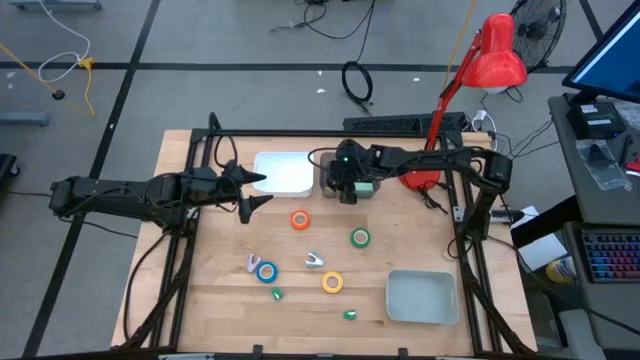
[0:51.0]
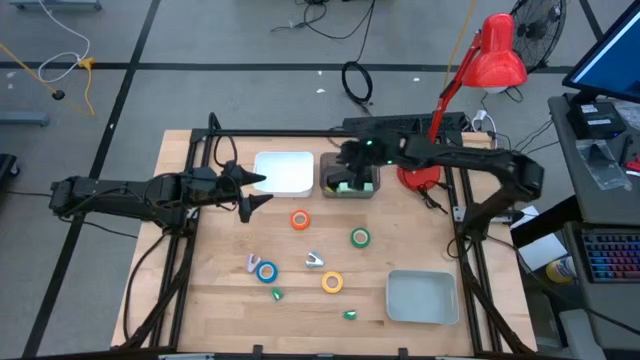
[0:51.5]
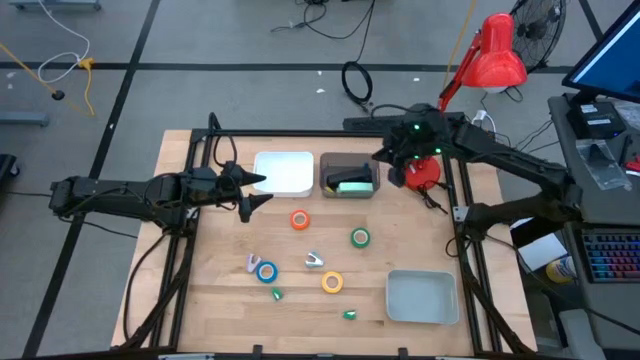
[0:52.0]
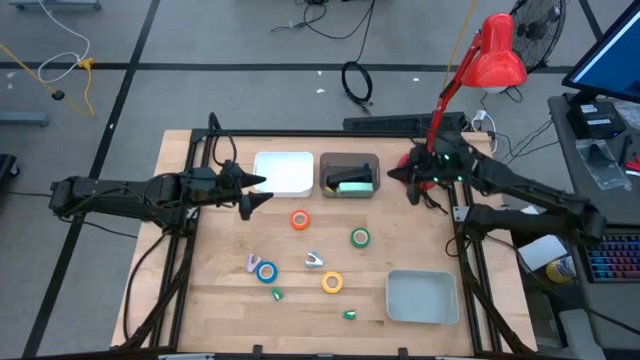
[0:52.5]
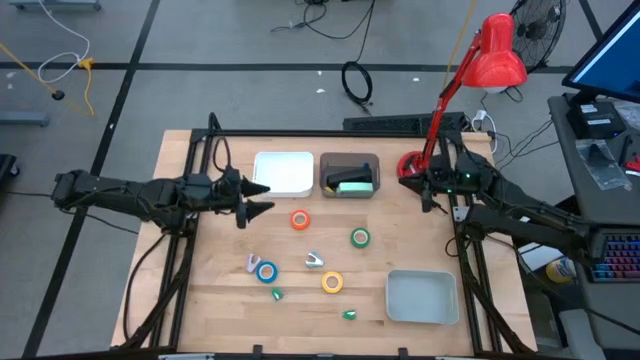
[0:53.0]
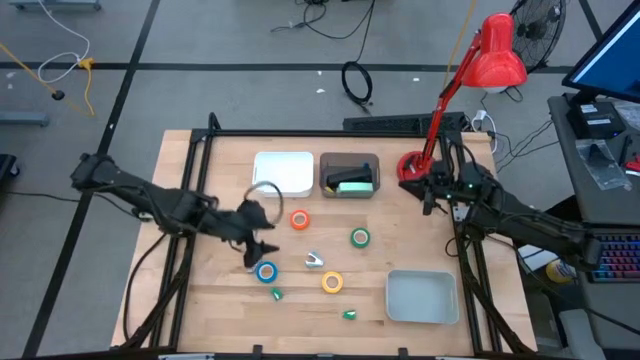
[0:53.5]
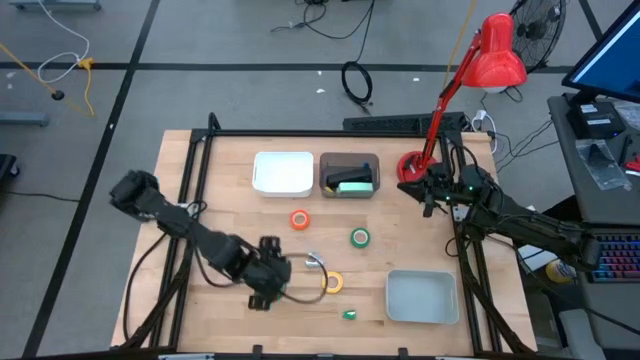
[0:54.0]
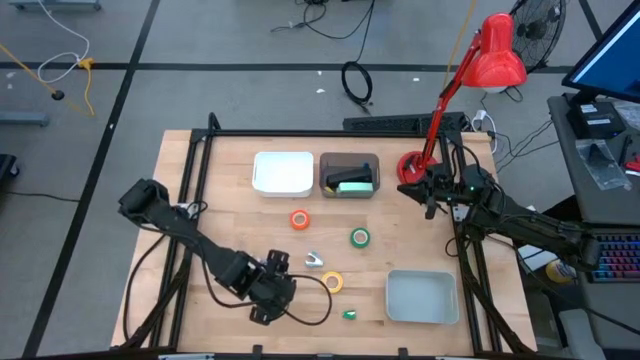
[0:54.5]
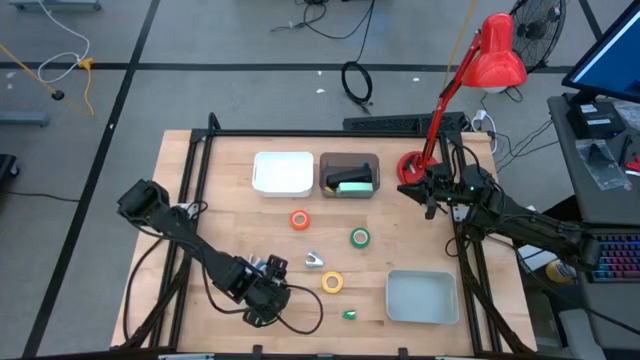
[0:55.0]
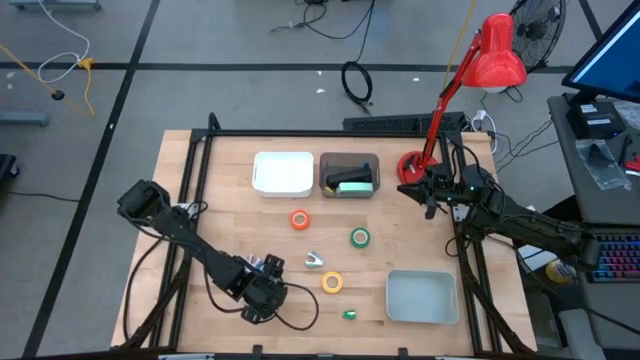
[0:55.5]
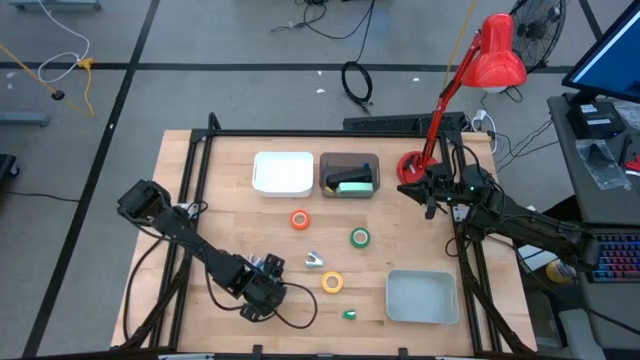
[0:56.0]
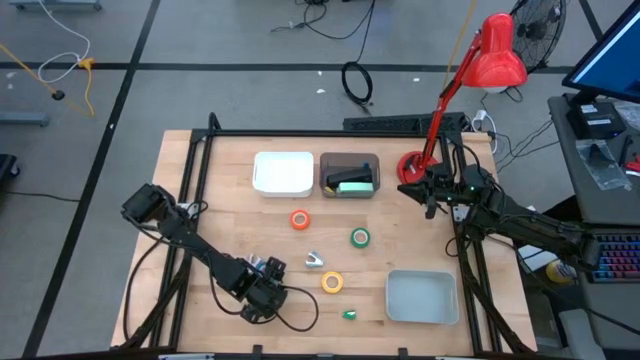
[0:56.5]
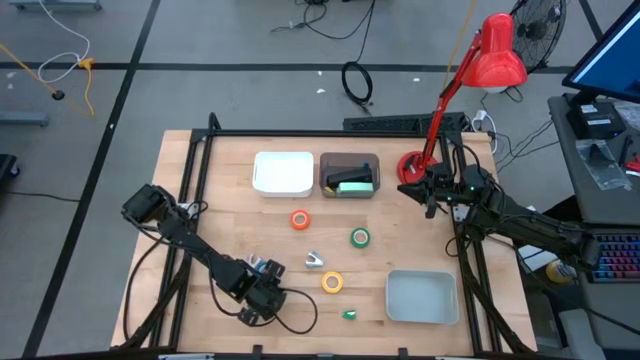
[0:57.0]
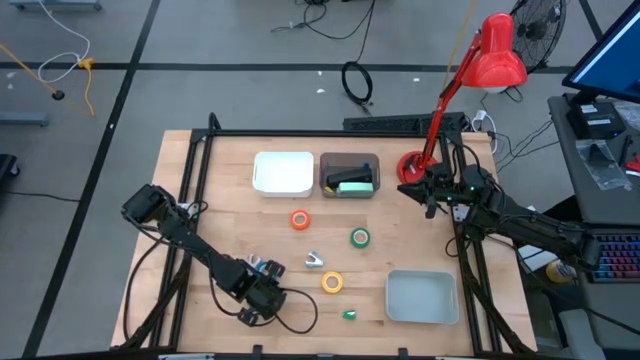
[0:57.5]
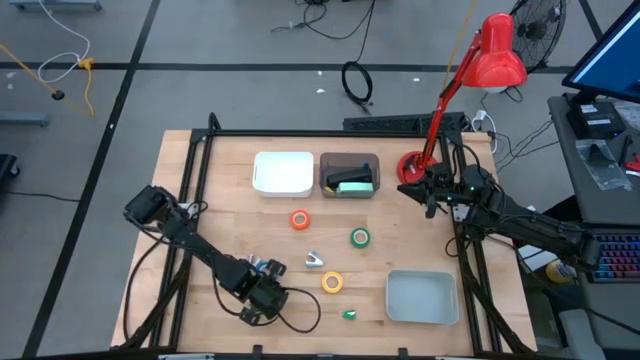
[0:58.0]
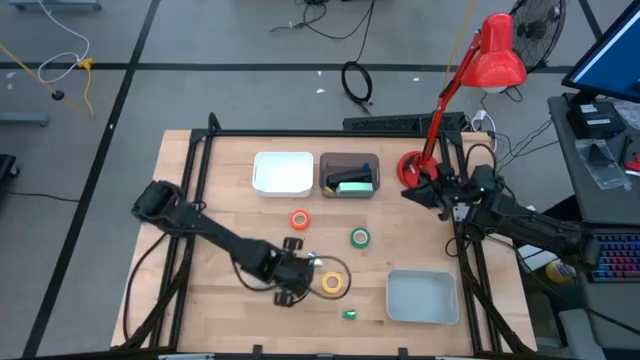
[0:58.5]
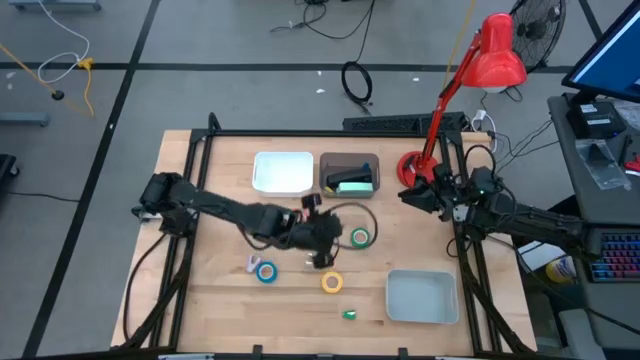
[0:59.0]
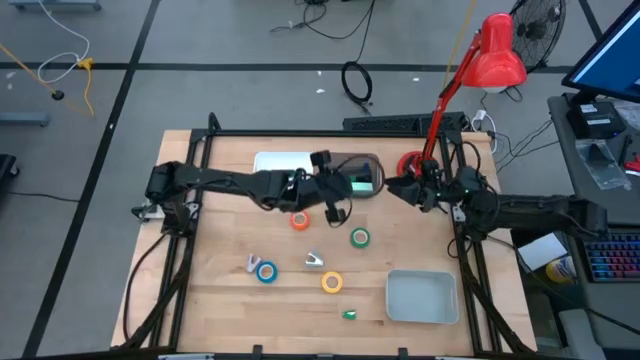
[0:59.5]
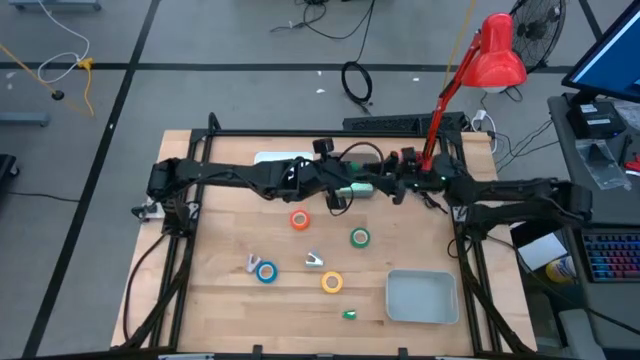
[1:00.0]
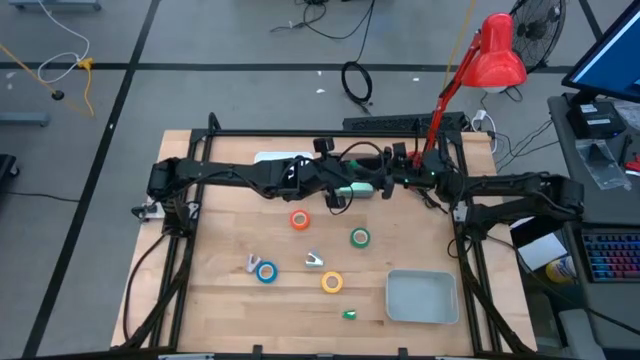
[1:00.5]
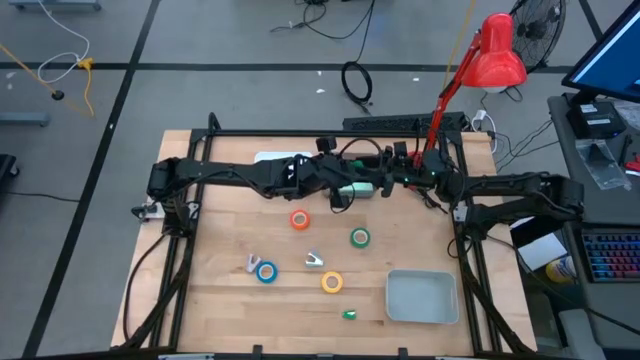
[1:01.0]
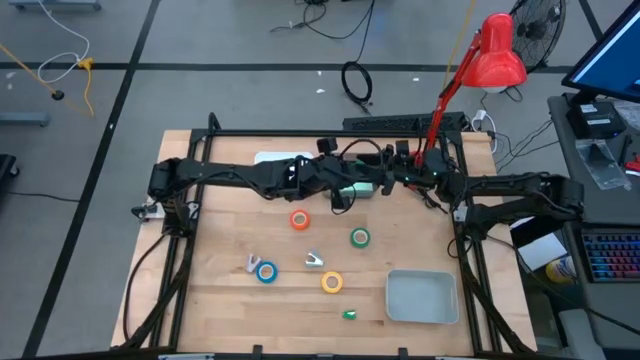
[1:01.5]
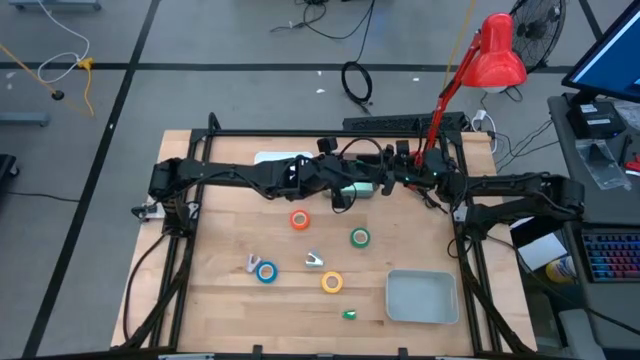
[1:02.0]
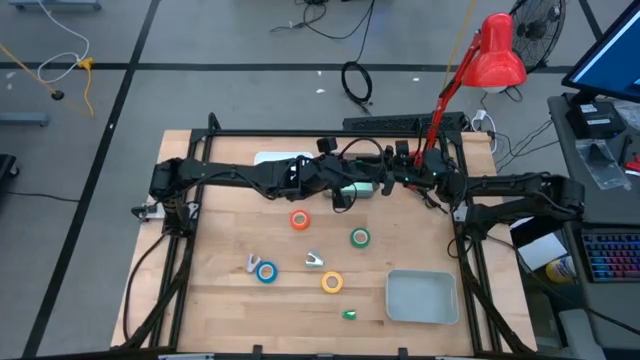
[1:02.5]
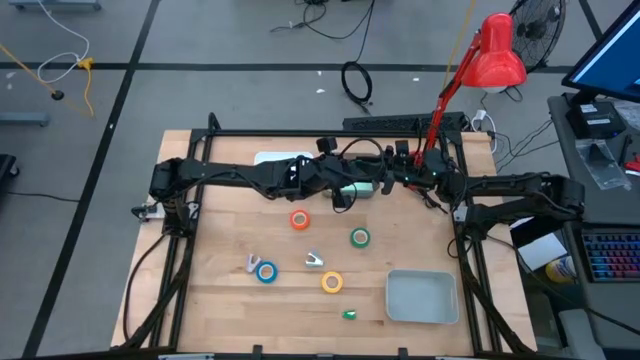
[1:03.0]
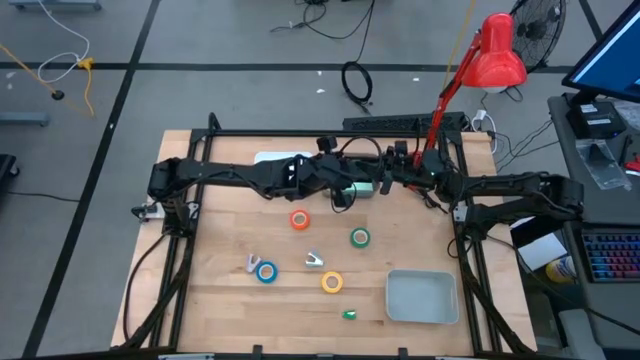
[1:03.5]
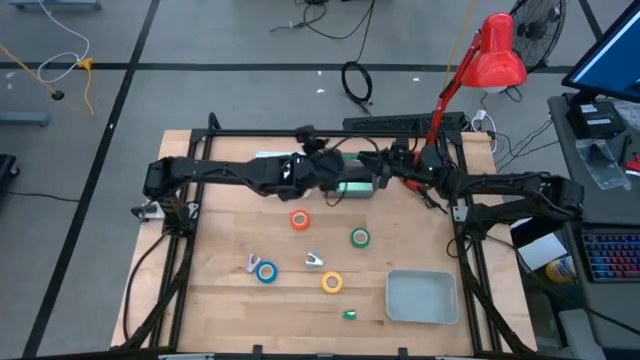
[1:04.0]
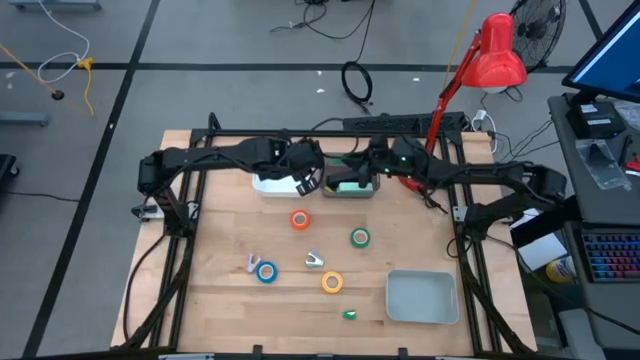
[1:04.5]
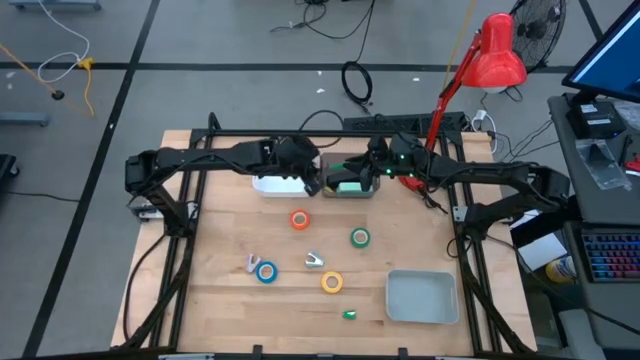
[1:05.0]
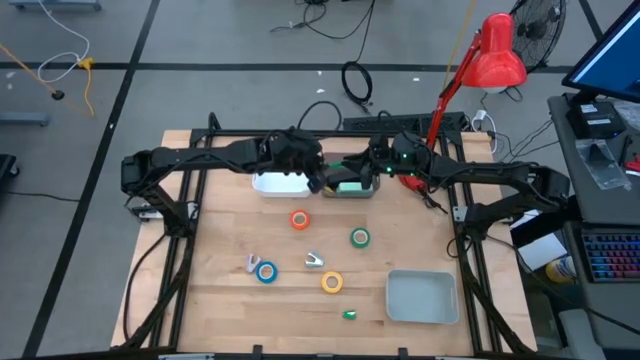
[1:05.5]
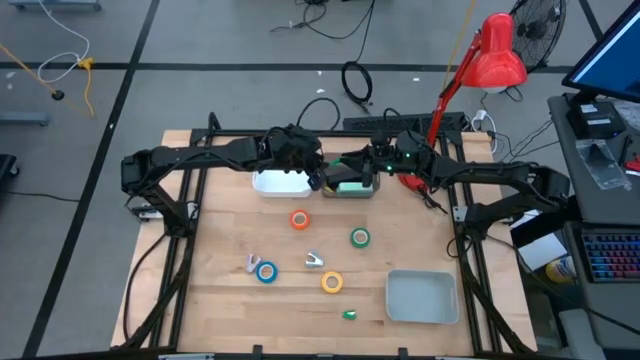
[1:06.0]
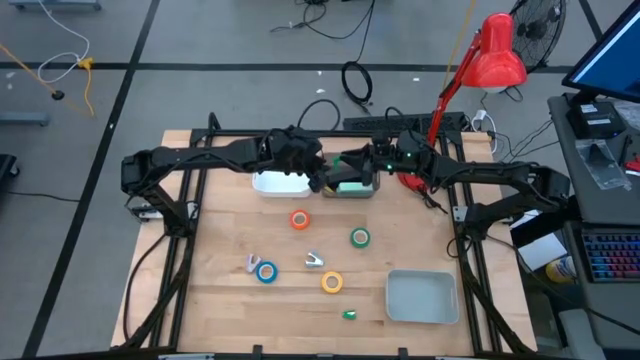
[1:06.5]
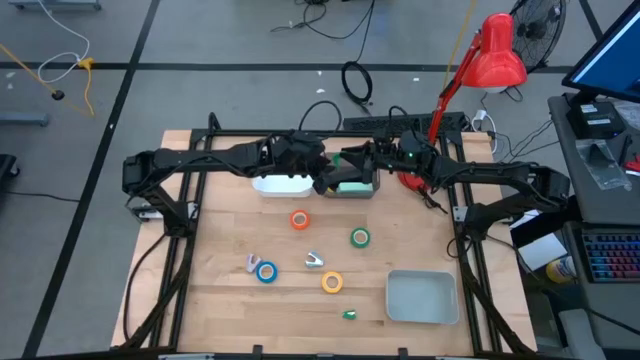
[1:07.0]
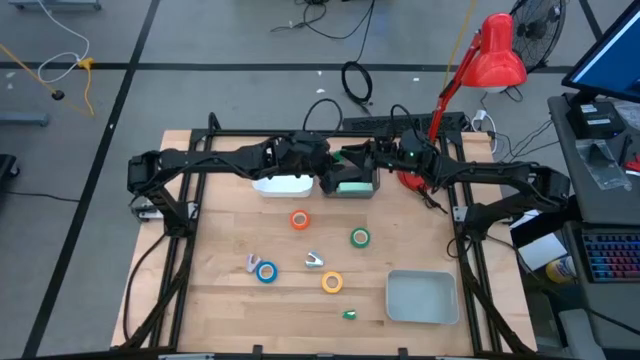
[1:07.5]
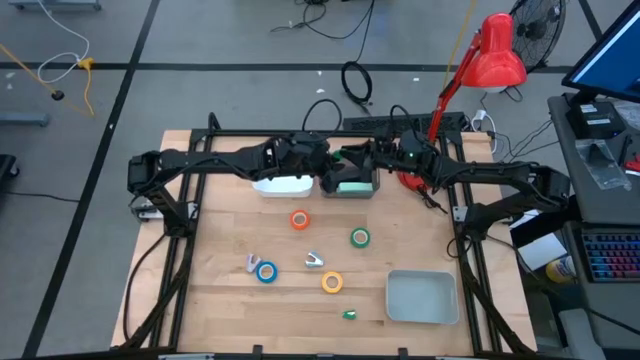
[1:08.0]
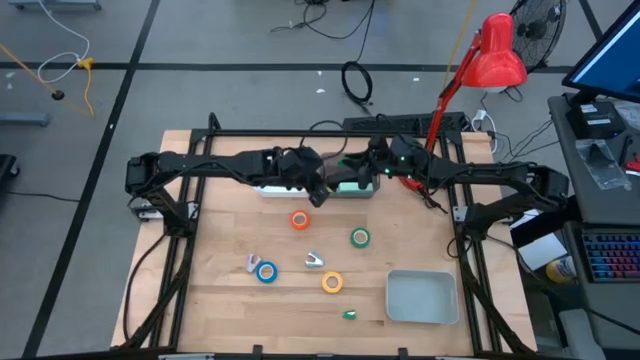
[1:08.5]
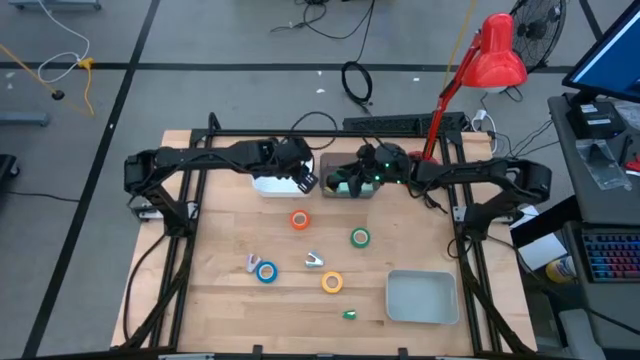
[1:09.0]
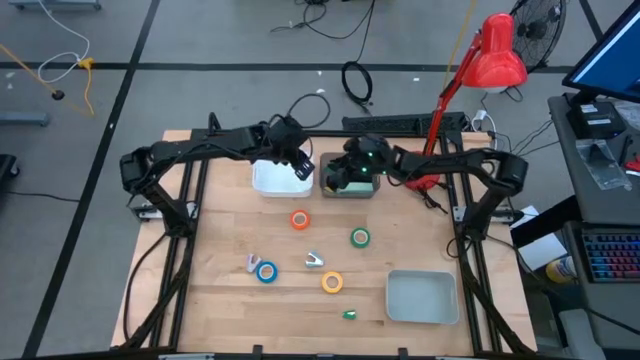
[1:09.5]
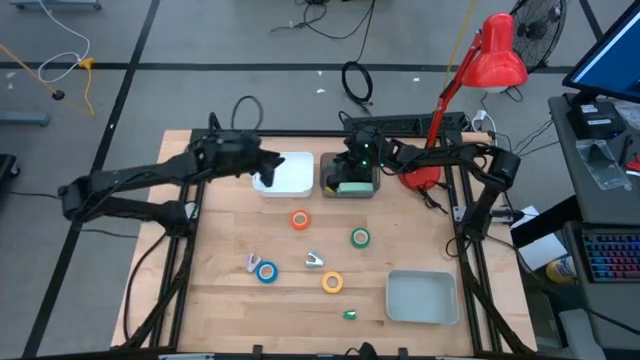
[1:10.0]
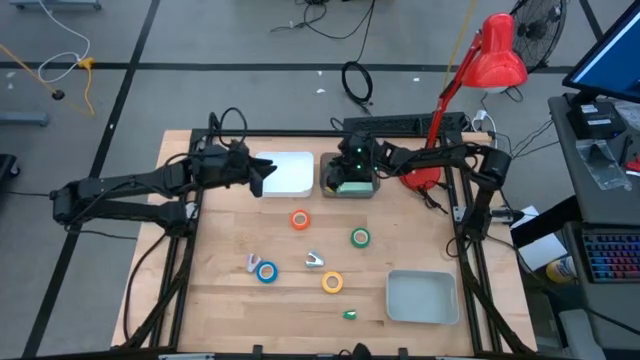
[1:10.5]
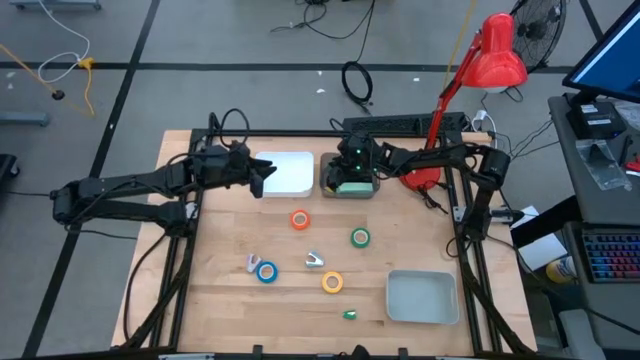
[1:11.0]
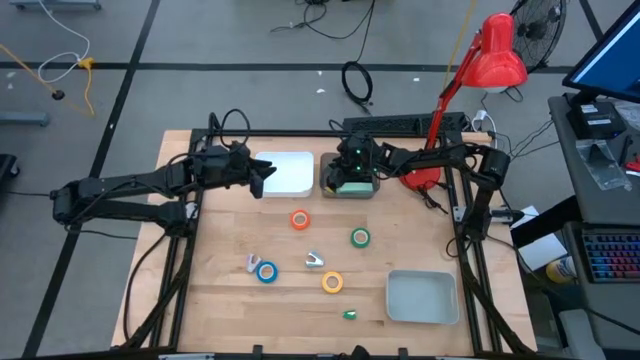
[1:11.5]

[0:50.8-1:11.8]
Task: Pick and place Stapler, Stapler remover, tape
Put the green stapler into the black bin
